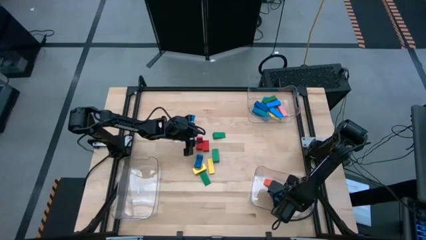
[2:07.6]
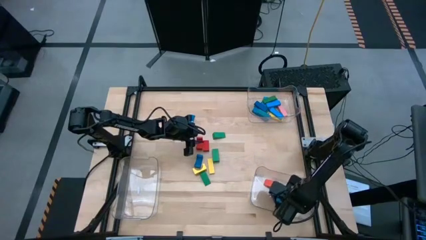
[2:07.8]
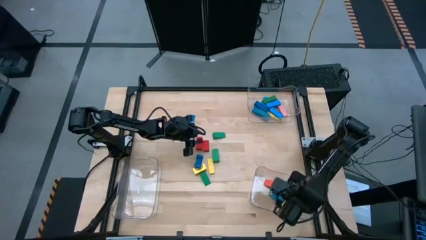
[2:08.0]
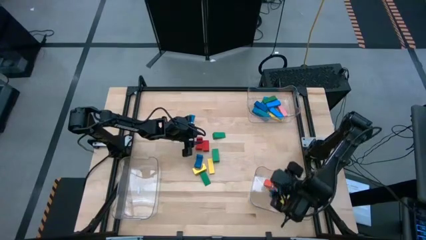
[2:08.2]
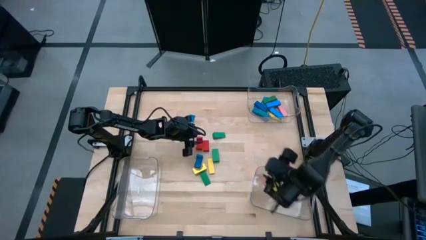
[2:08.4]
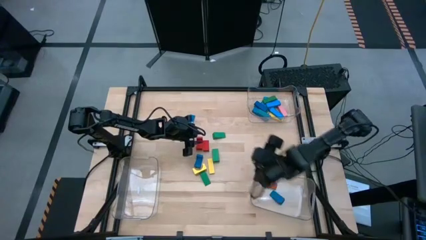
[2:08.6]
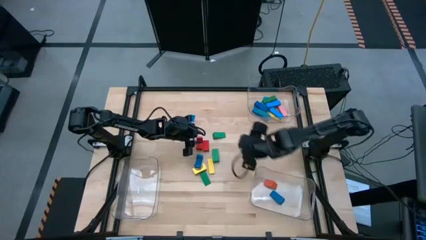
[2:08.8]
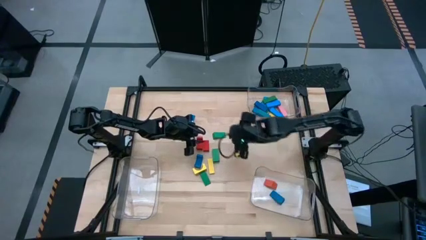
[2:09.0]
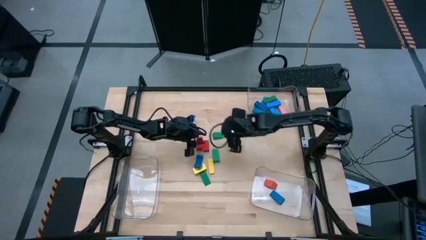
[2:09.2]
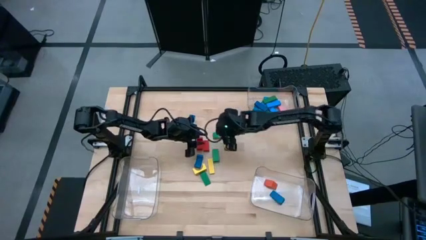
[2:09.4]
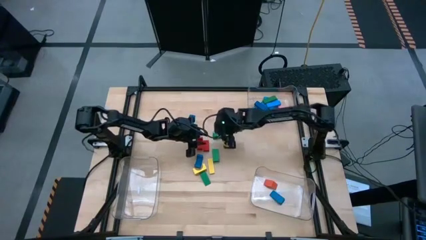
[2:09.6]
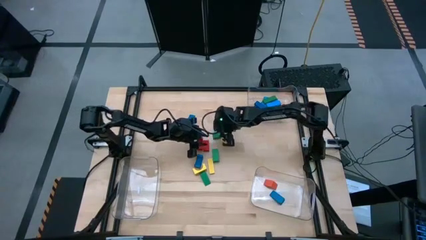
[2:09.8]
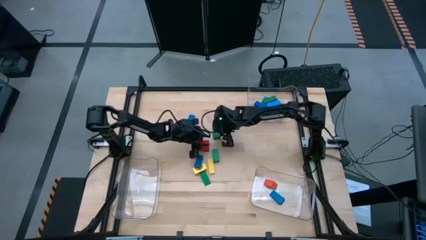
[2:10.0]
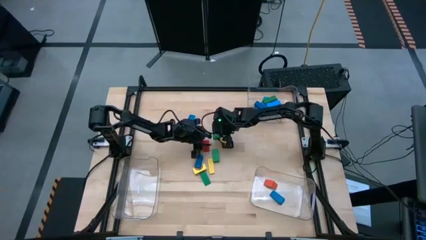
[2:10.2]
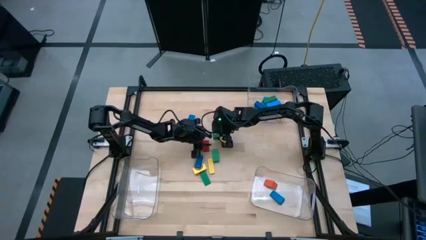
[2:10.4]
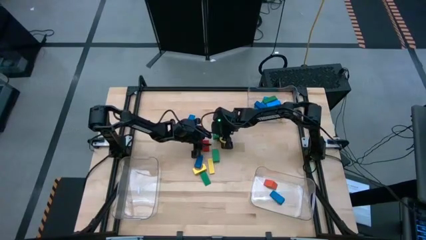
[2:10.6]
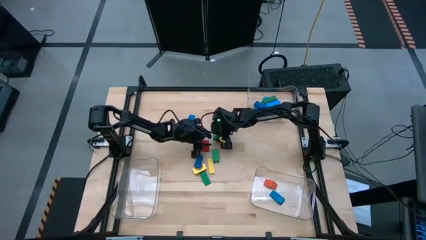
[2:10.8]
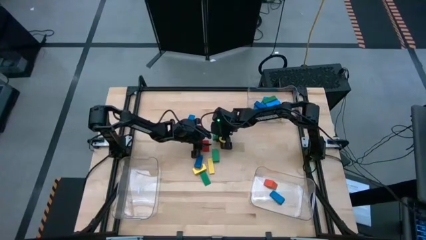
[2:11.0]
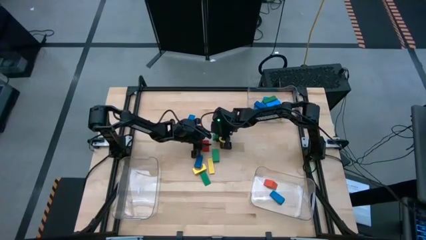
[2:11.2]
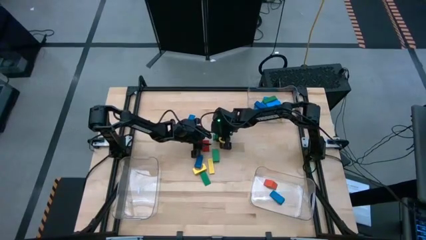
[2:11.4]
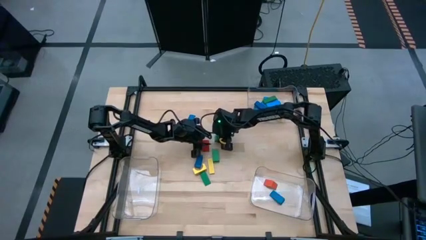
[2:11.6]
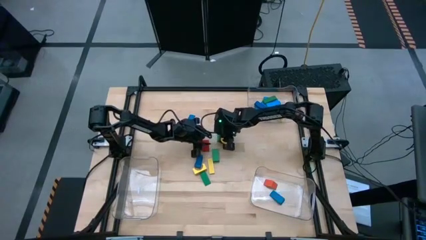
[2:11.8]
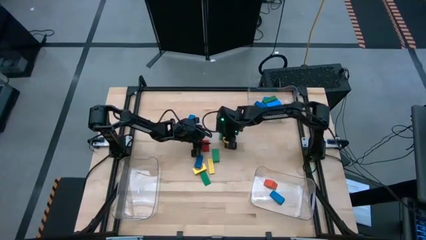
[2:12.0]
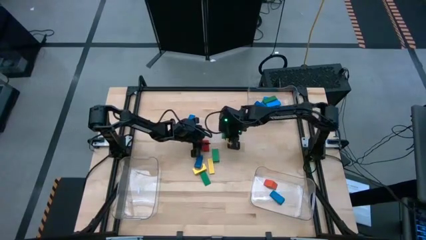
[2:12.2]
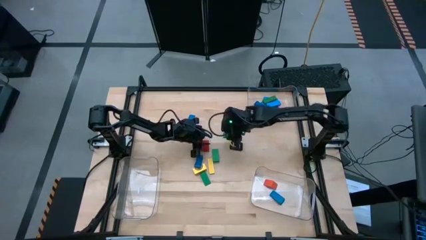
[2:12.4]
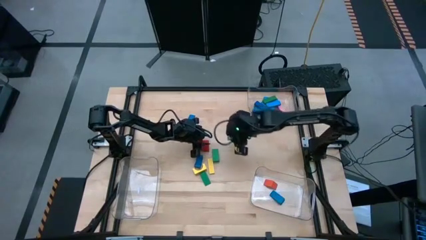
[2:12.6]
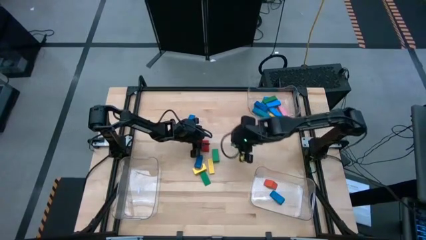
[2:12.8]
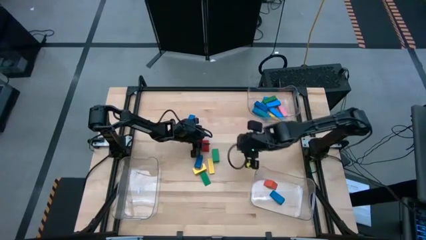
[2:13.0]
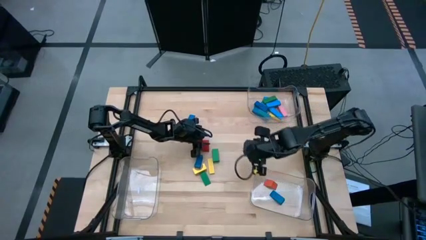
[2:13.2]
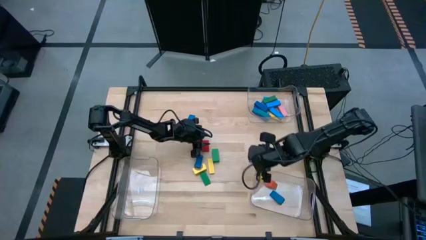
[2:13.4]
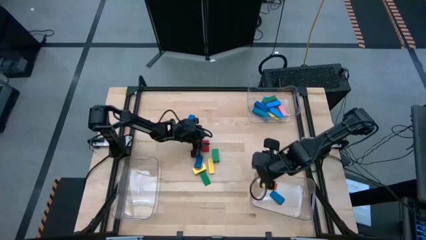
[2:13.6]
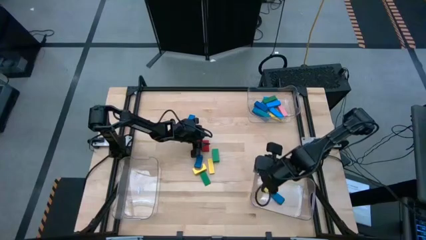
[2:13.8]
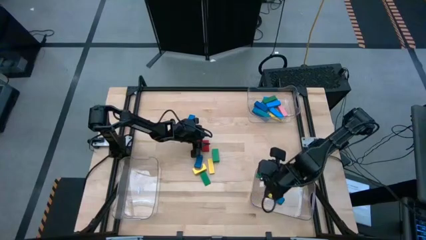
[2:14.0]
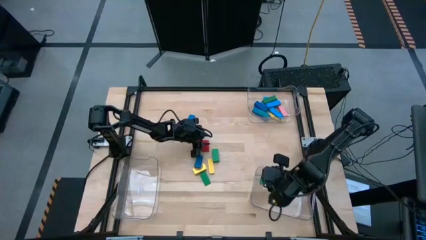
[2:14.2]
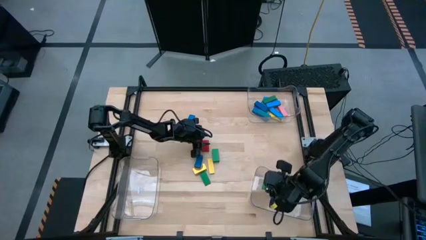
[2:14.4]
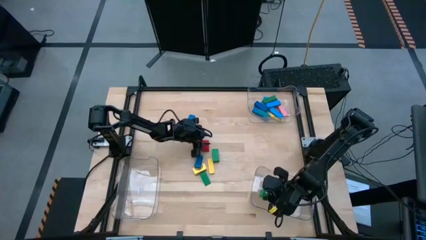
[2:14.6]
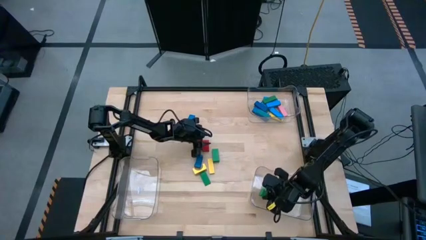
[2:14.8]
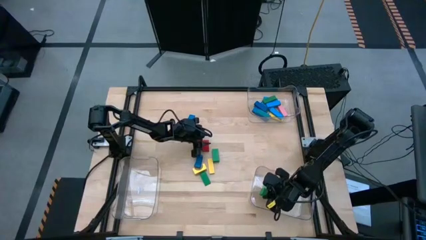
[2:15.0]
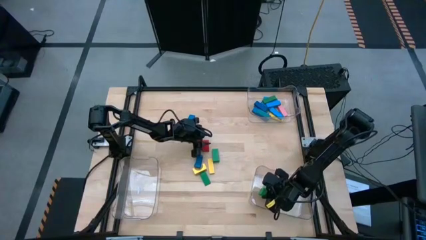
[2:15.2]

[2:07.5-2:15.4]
Task: Sort blocks by size
Put the green triangle block into the bottom right transparent bin

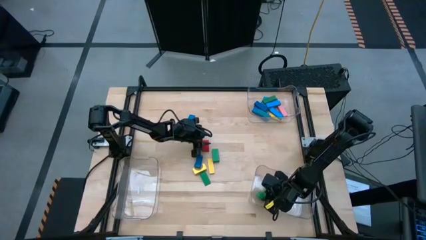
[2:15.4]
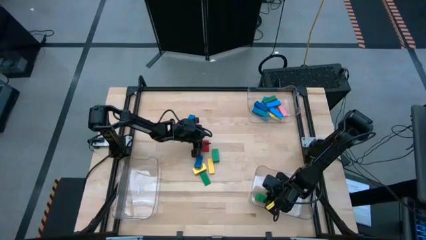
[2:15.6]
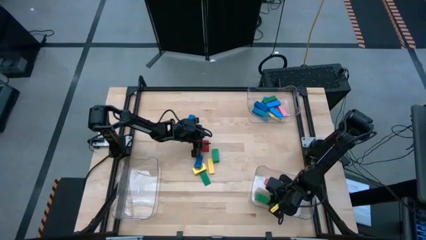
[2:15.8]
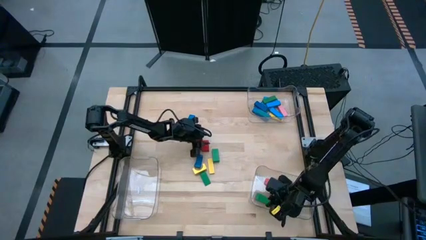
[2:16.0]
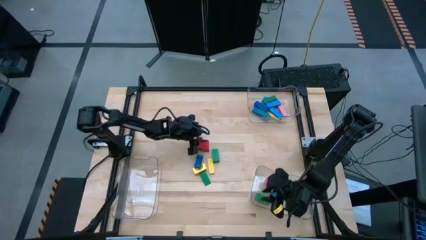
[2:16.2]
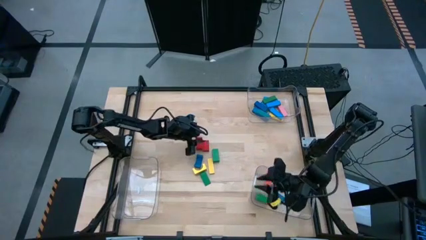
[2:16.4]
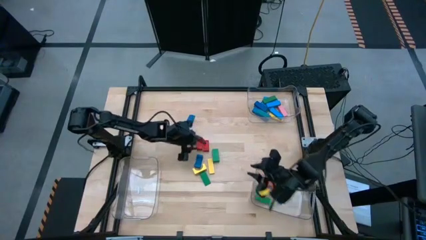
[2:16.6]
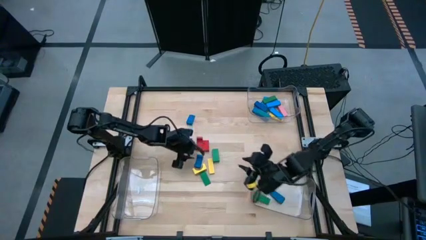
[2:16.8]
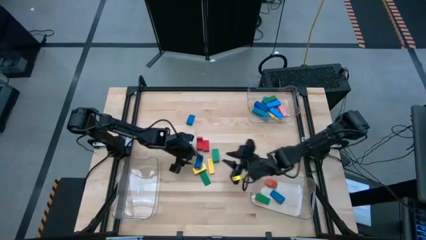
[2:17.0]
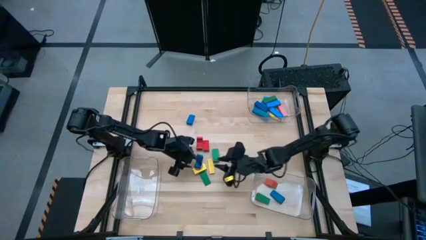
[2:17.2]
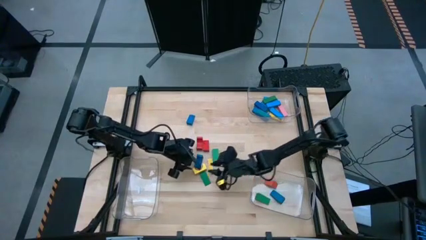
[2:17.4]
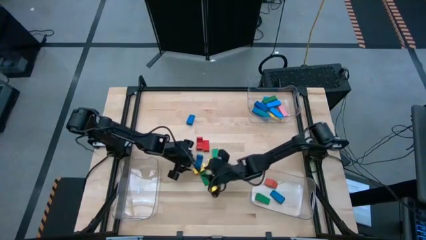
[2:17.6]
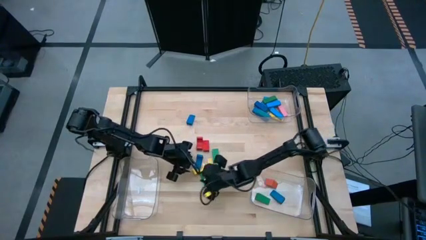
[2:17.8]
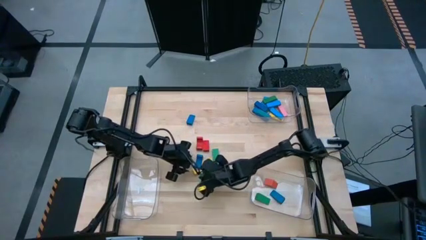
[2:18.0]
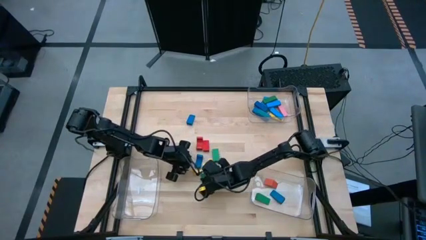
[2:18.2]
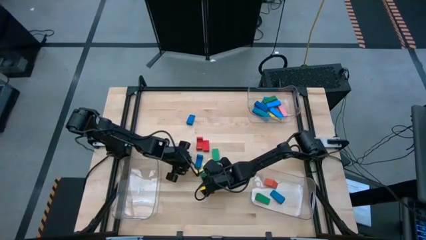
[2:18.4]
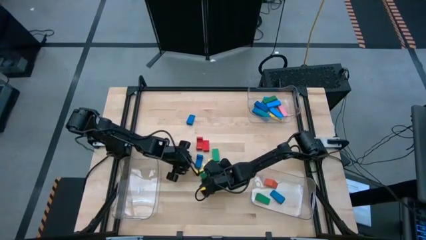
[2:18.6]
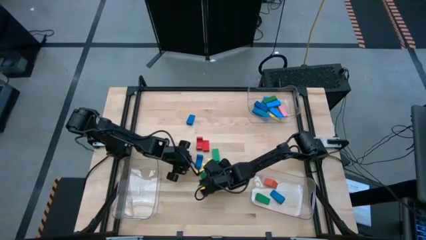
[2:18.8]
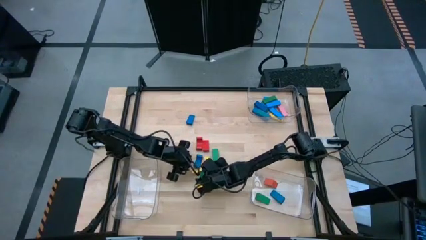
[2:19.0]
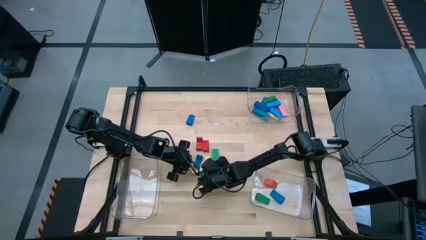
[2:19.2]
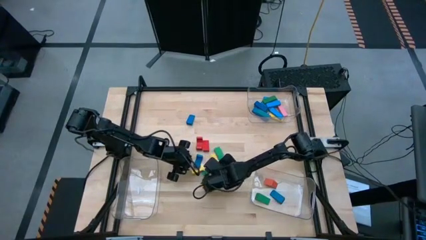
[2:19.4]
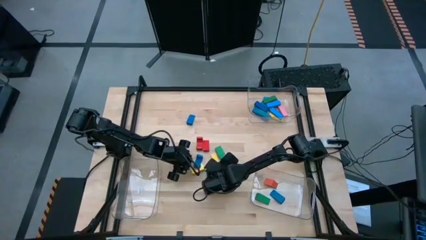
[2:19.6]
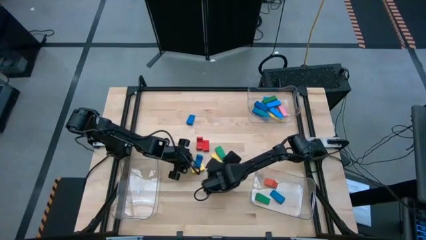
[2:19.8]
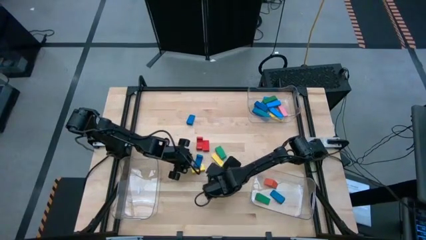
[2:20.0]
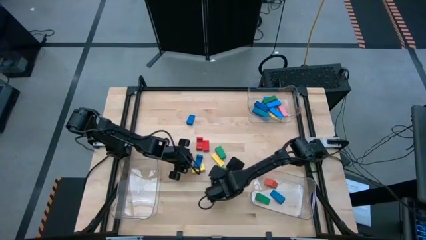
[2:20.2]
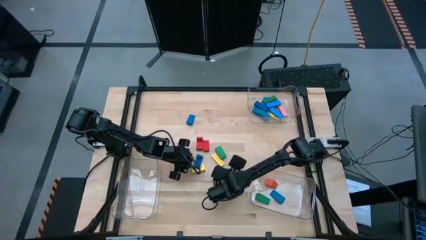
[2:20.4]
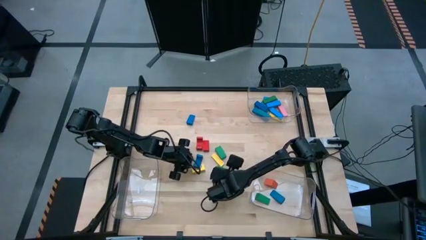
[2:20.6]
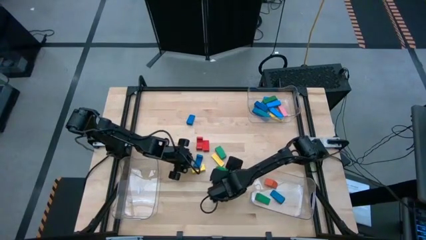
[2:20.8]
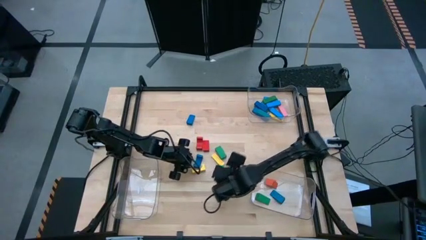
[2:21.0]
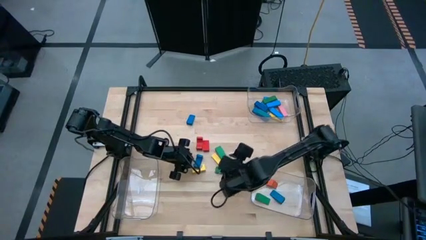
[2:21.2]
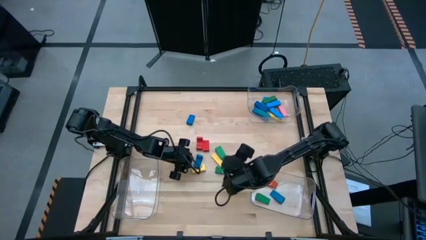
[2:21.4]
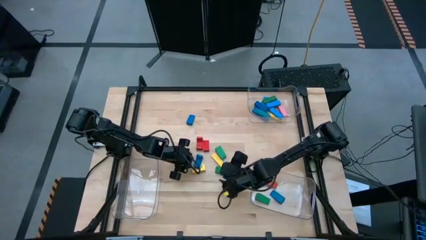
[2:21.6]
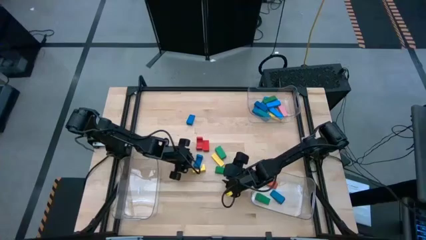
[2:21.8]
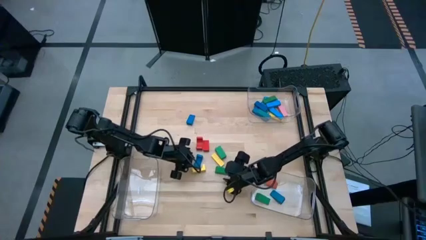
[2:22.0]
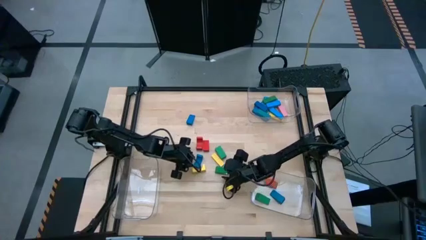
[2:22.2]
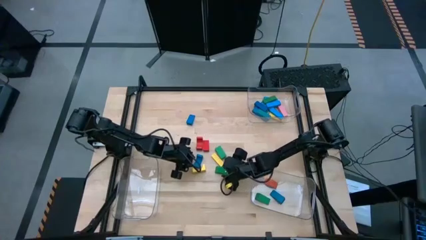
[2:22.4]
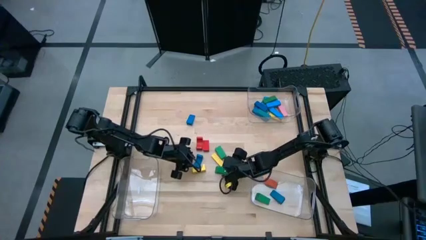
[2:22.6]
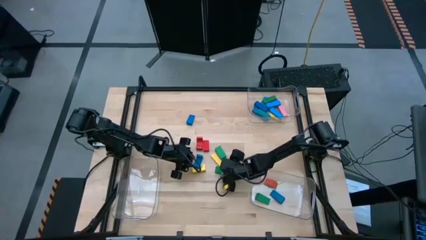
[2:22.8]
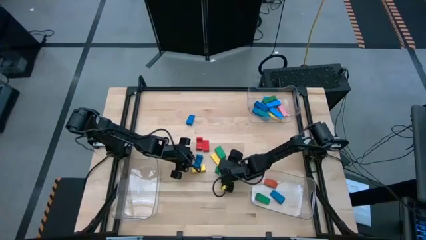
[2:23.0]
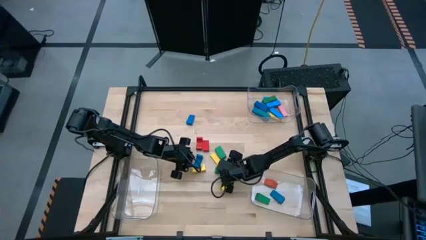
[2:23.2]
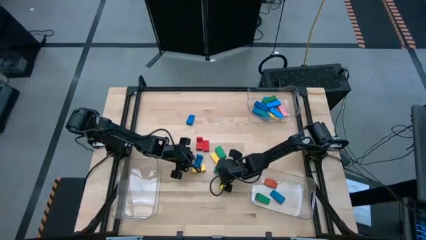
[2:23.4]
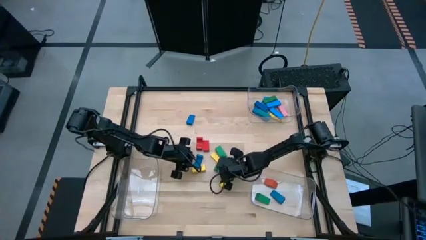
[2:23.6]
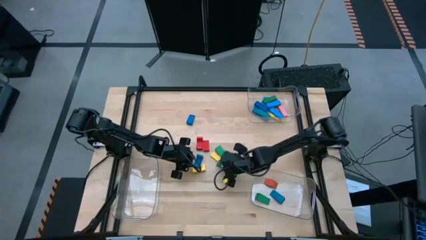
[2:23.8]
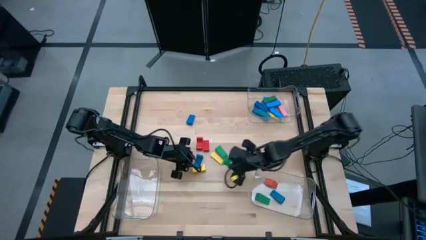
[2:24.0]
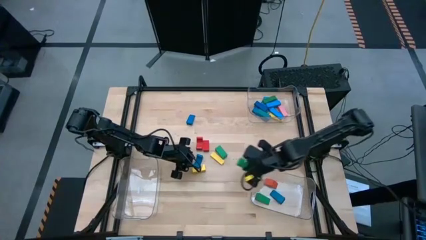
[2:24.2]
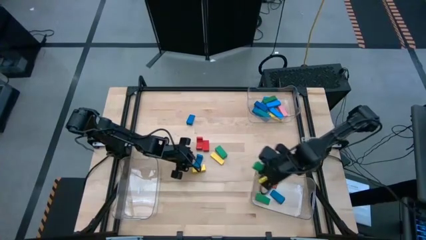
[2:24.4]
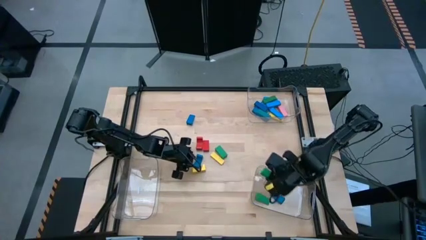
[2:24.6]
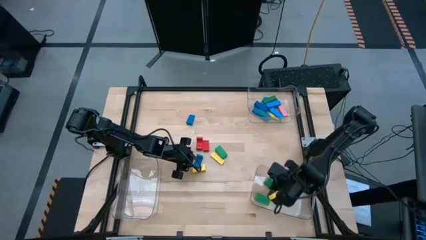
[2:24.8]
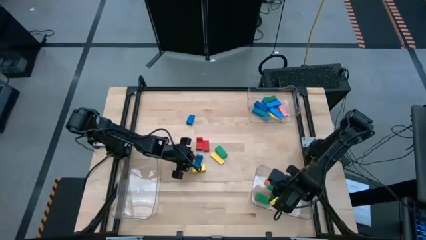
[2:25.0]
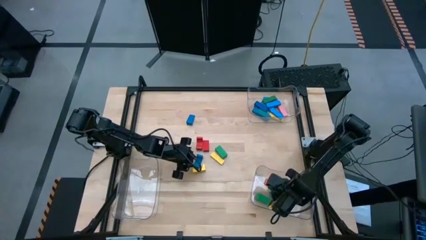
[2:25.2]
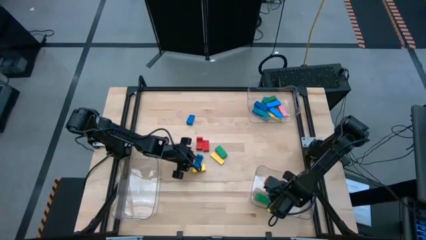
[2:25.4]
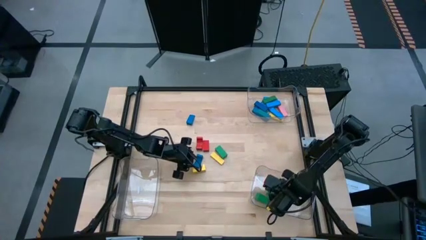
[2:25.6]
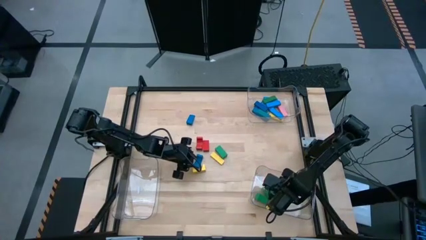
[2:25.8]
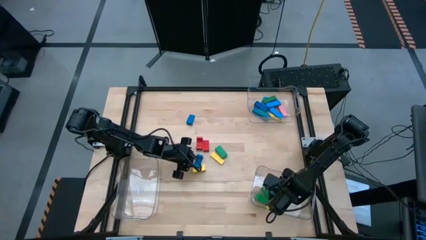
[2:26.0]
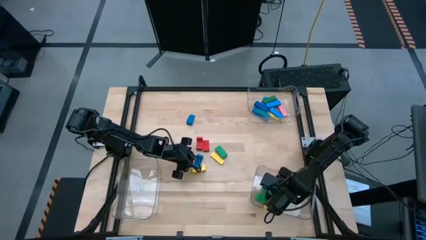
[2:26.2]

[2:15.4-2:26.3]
Put the green triangle block into the bottom right transparent bin
